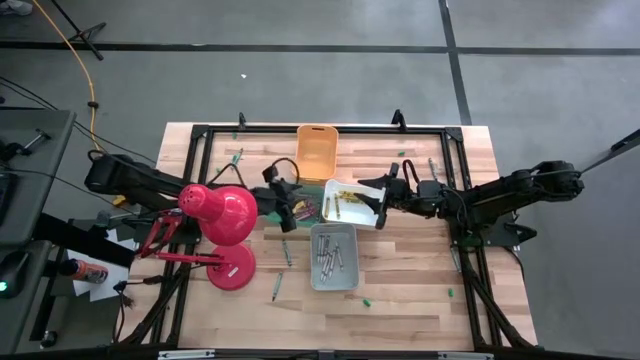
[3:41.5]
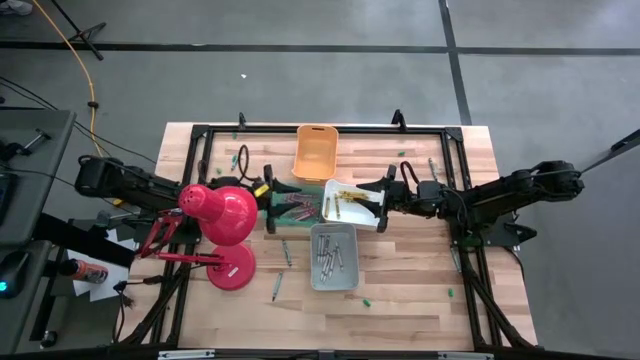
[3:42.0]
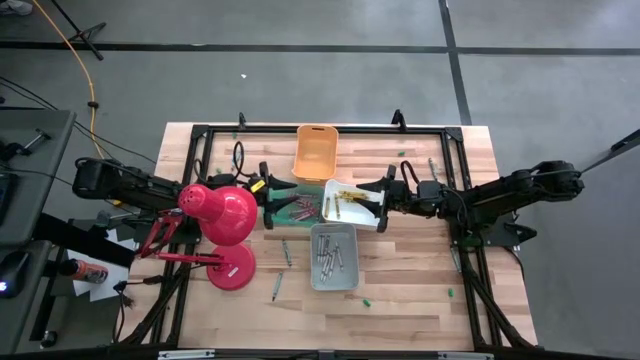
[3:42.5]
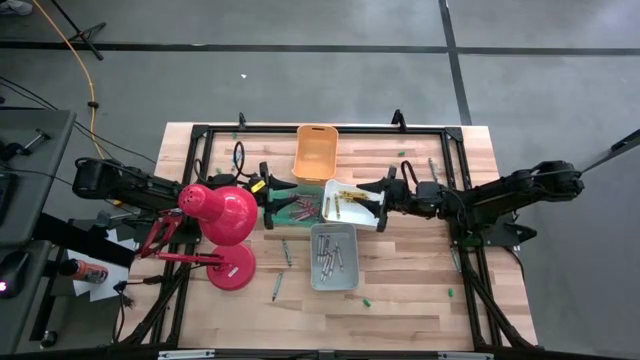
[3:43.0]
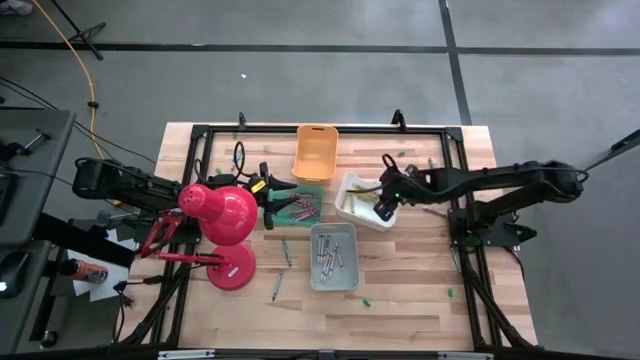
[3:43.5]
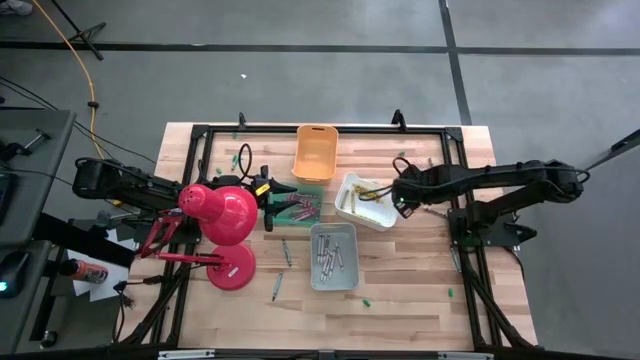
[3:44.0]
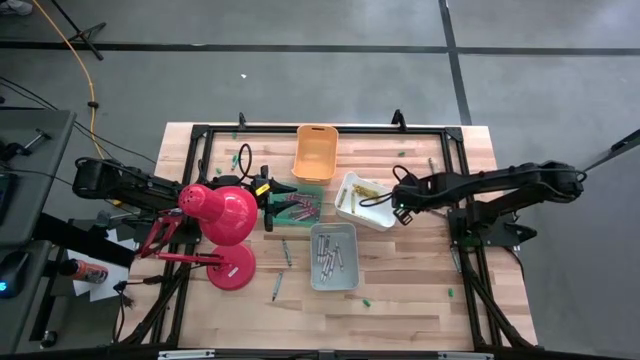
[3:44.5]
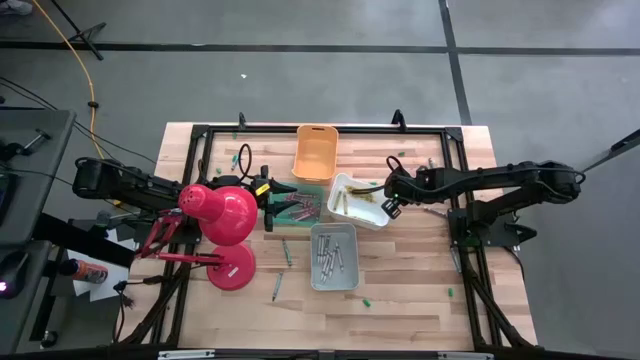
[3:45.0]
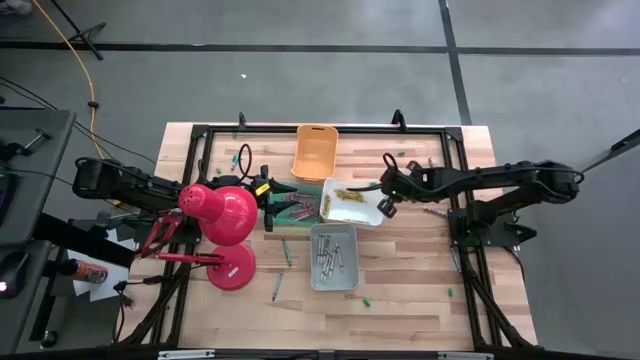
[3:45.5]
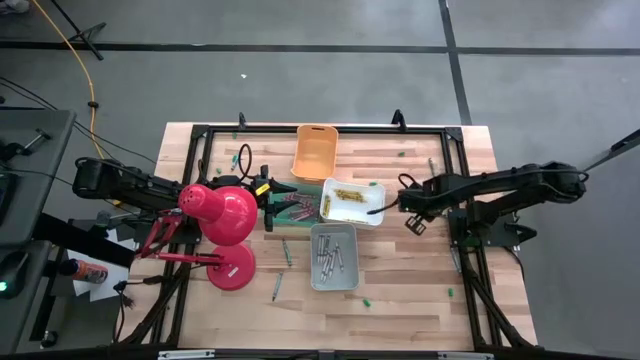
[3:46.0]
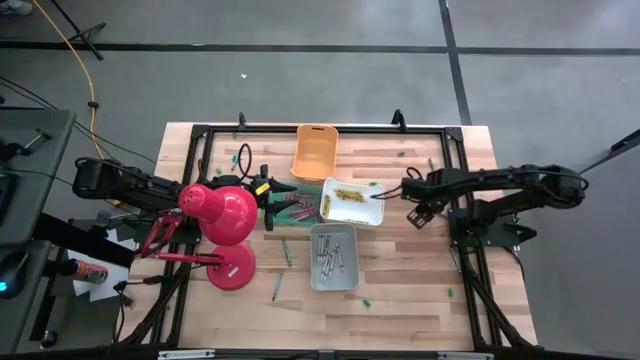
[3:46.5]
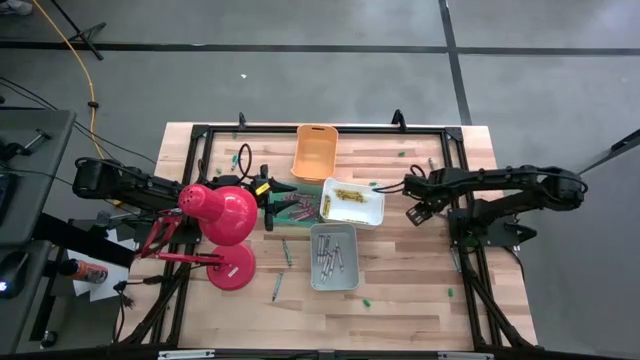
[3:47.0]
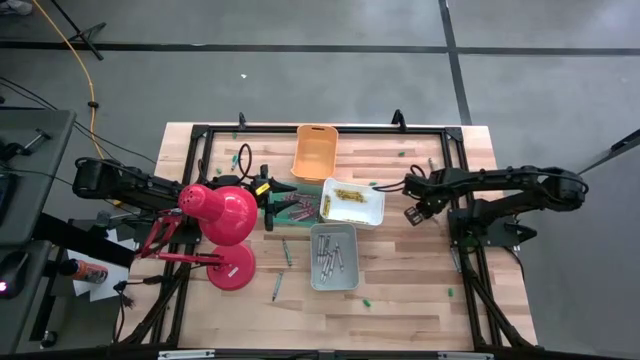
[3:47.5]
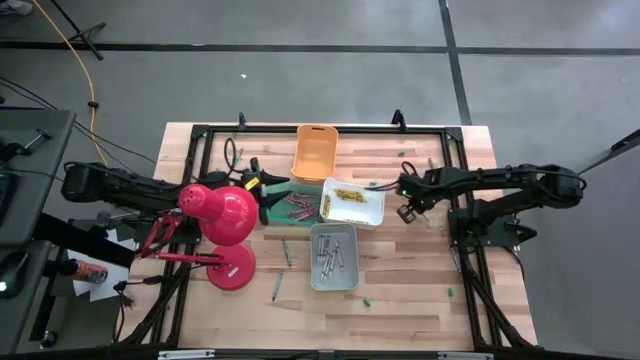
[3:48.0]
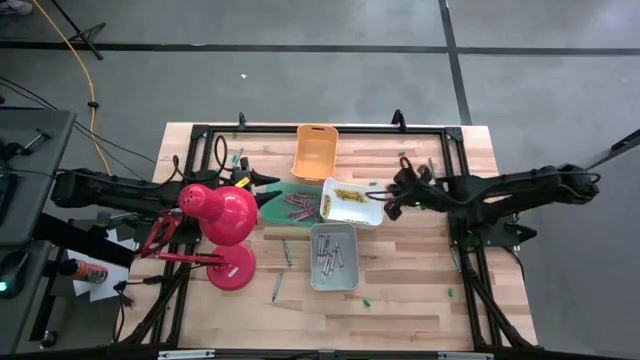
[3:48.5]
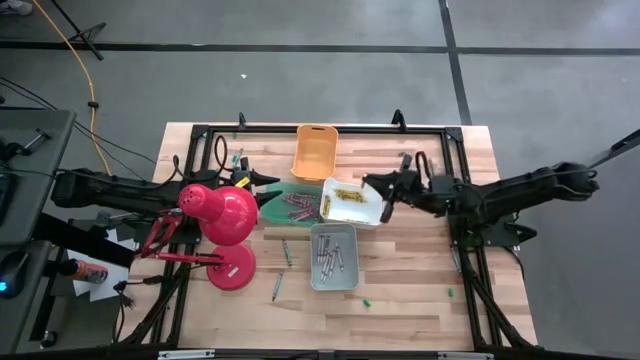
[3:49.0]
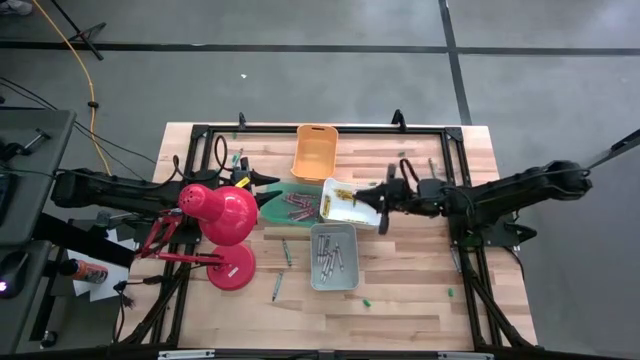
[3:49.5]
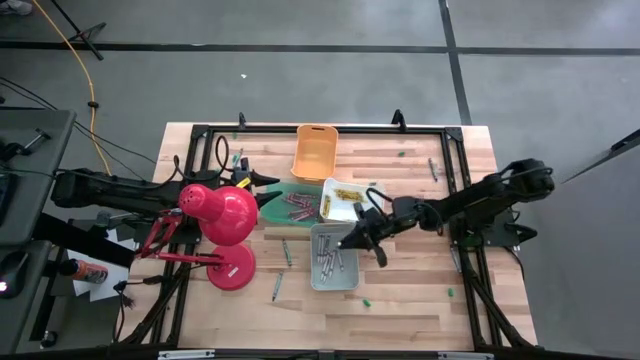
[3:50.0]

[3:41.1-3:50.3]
Task: Sort crayons
Put the white crayon into the gray bin

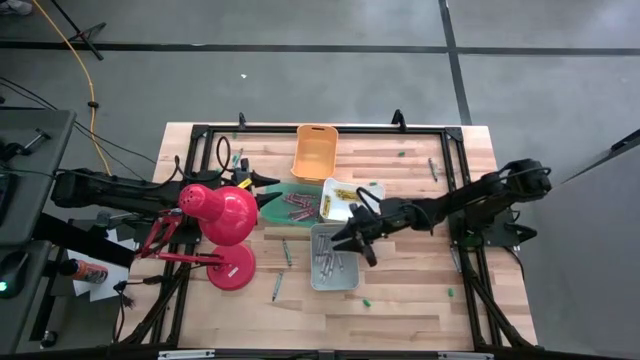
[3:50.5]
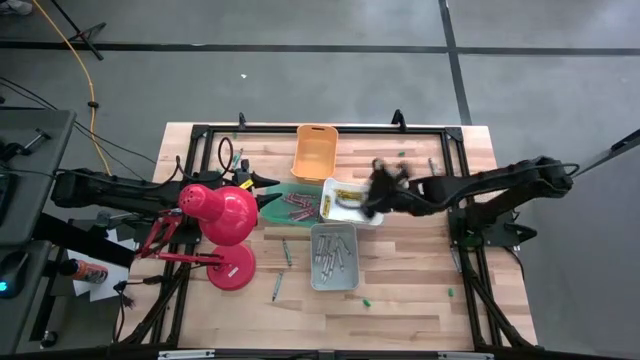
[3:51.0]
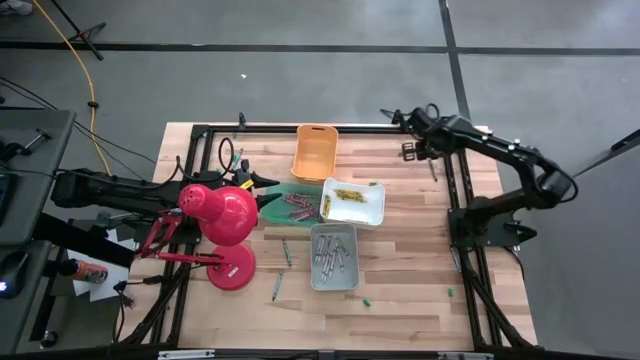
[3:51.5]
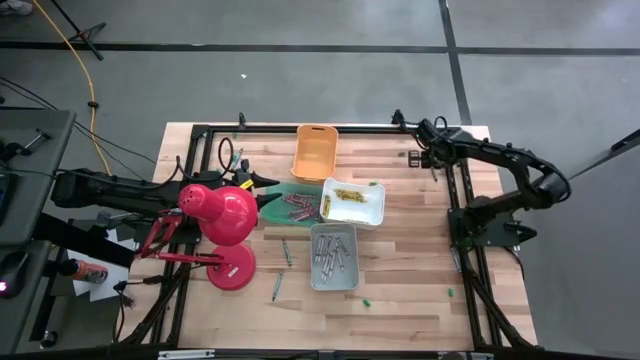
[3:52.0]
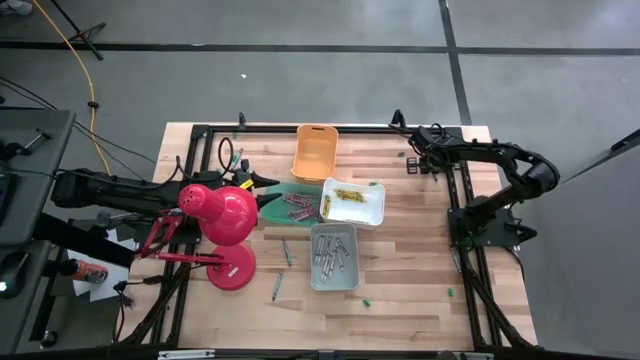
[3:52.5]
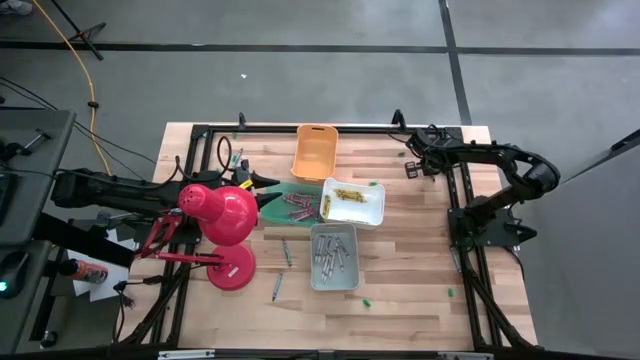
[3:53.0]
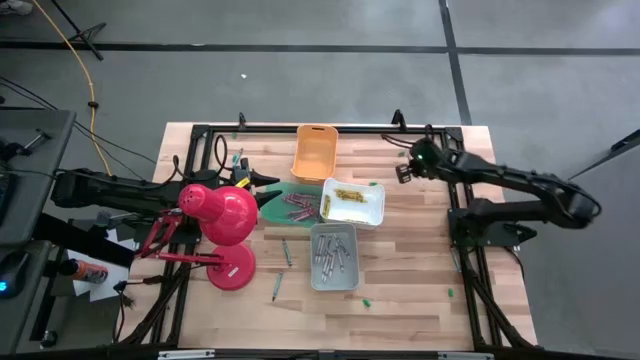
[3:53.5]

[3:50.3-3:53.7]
Put the blue crayon into the yellow bin

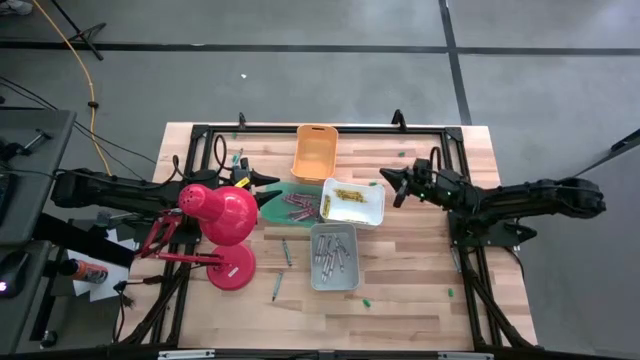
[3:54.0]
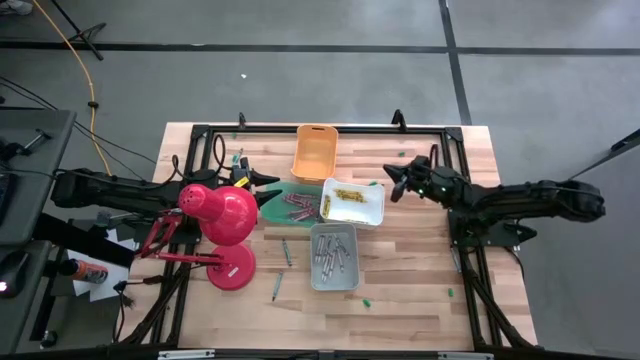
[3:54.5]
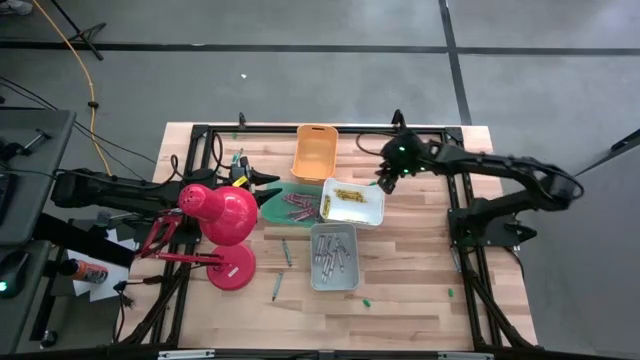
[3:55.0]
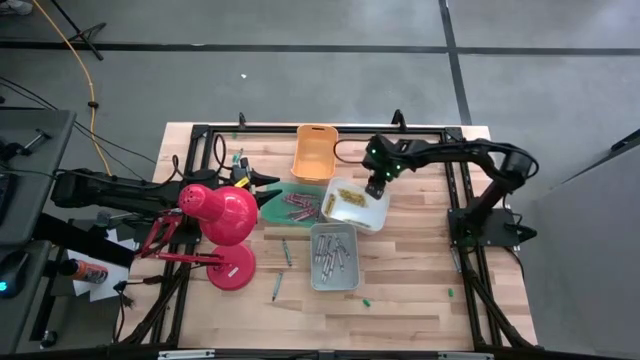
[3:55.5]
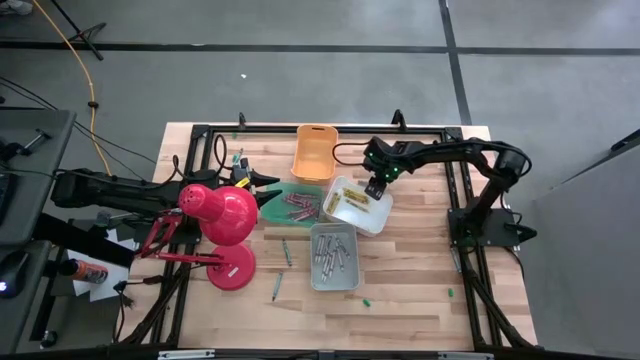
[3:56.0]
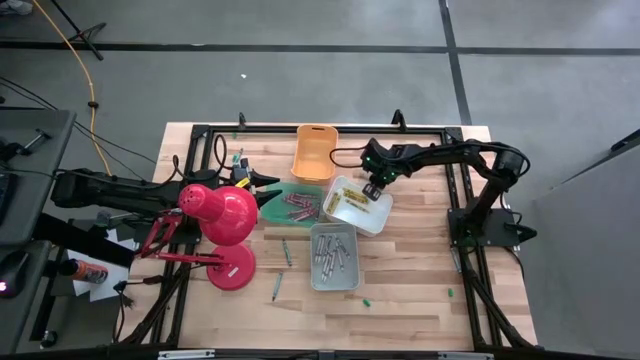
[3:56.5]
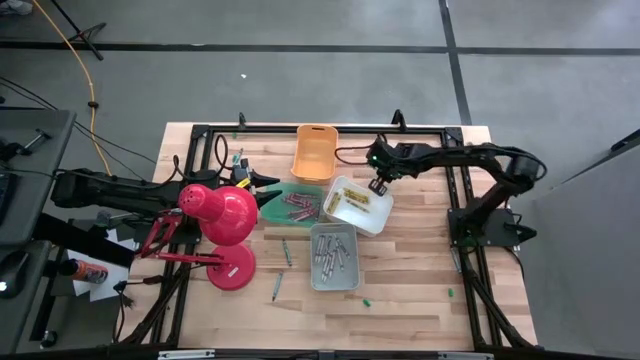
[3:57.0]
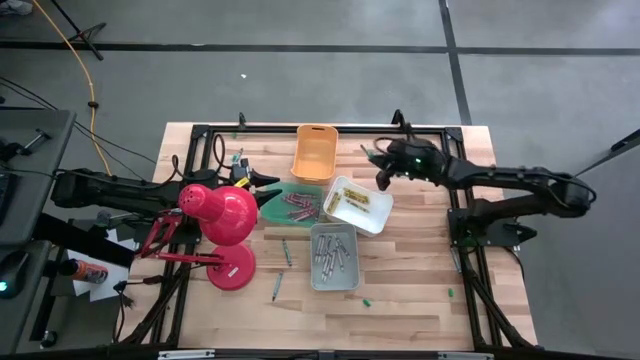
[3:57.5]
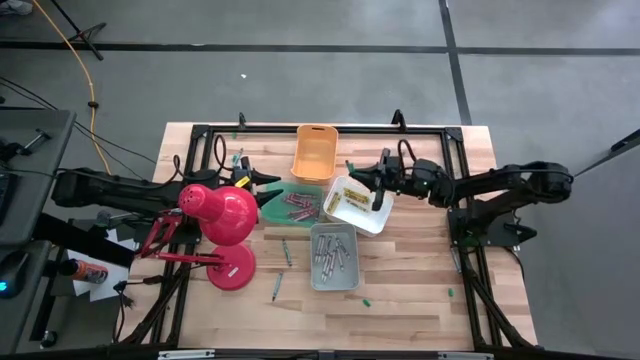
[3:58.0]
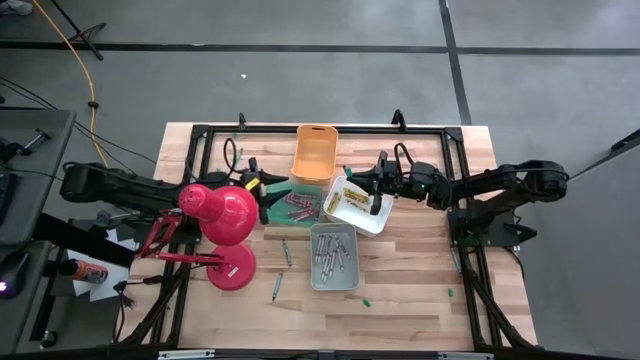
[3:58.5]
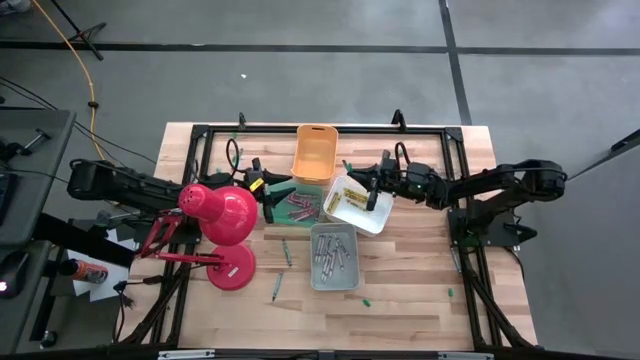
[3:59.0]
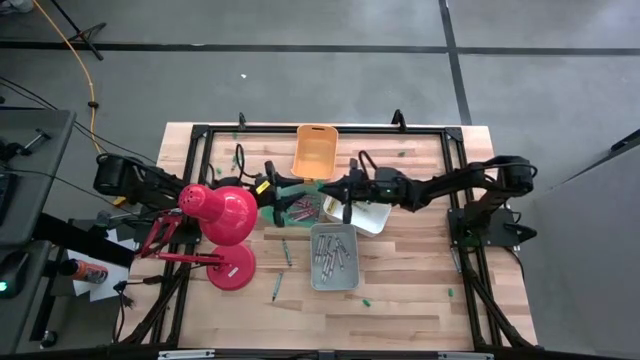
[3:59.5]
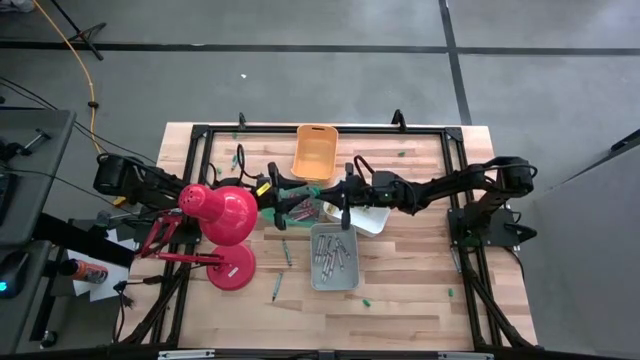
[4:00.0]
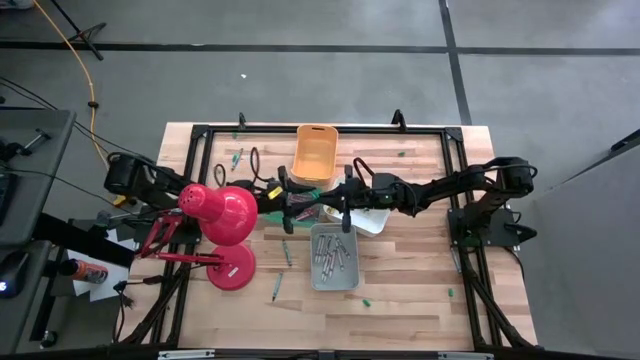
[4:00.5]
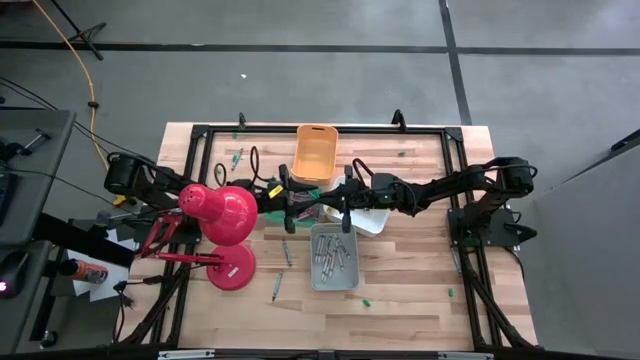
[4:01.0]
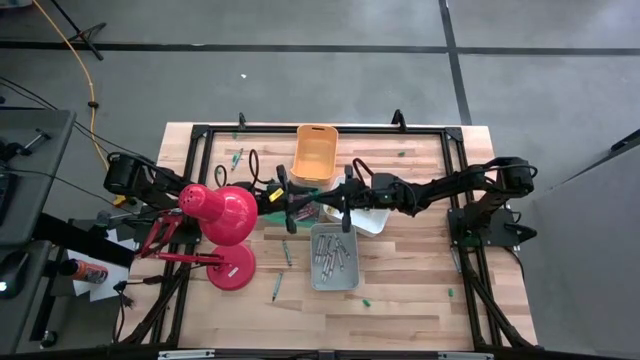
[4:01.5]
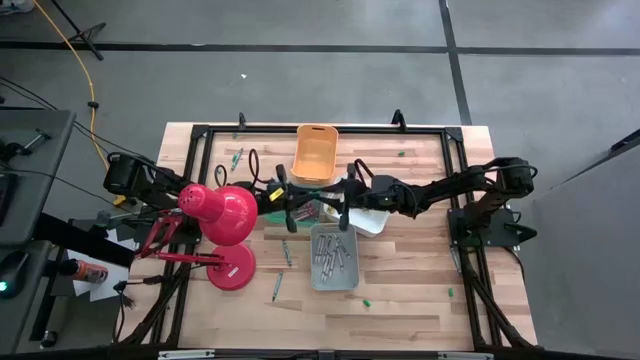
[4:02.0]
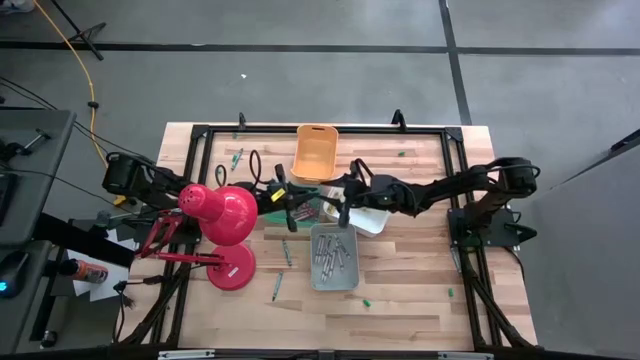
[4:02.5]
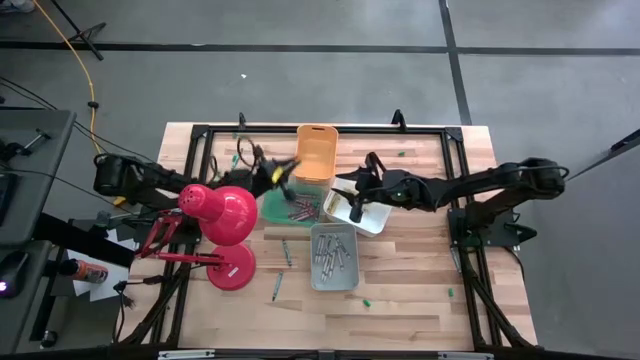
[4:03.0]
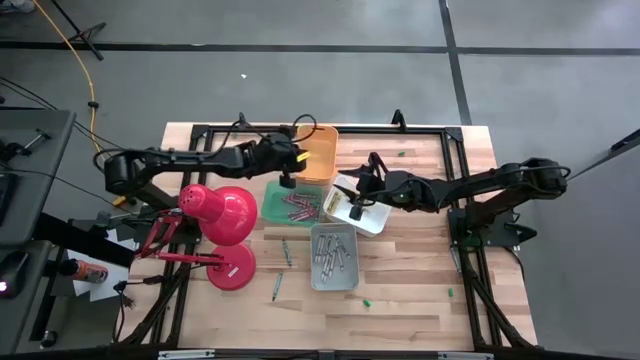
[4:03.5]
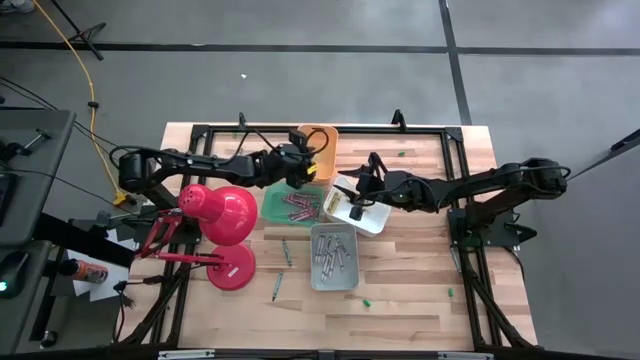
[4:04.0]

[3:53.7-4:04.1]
Put the blue crayon into the yellow bin
